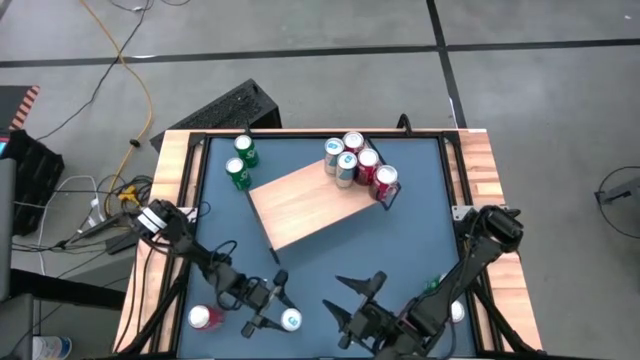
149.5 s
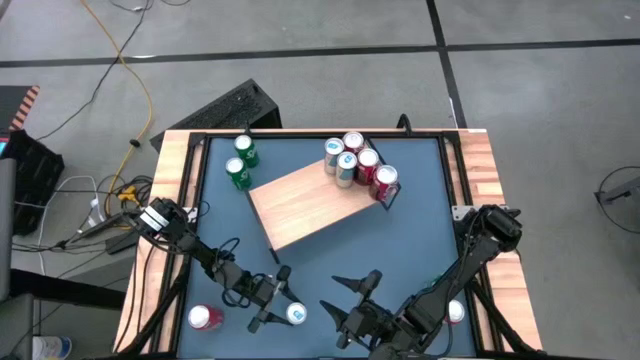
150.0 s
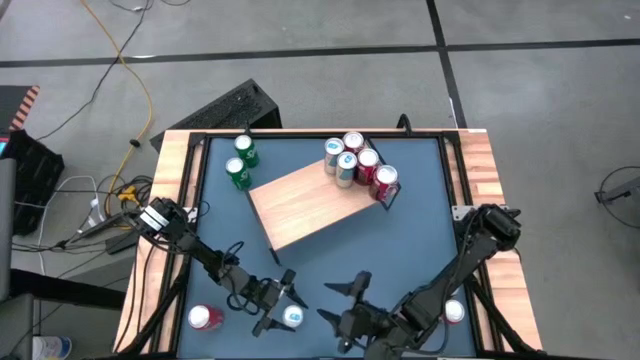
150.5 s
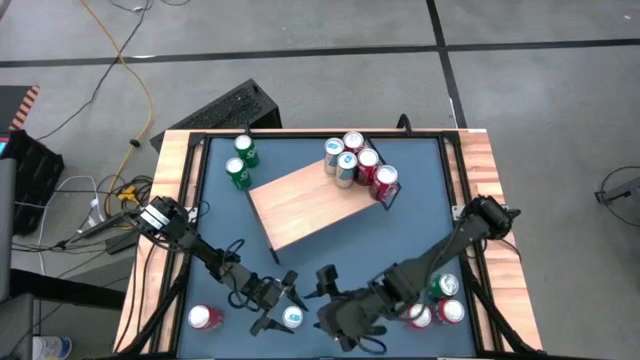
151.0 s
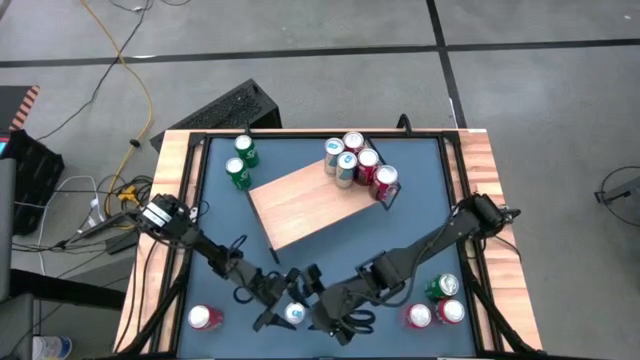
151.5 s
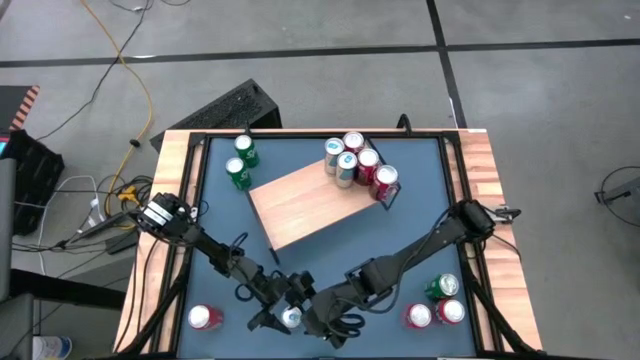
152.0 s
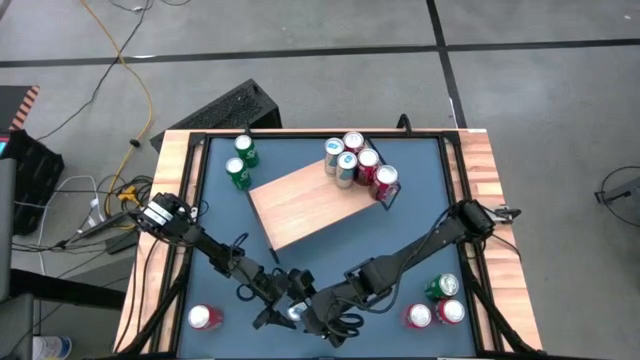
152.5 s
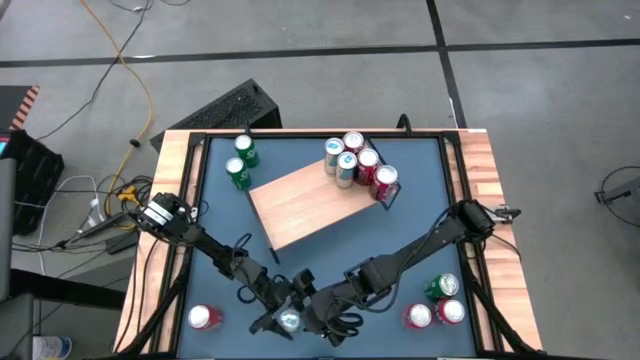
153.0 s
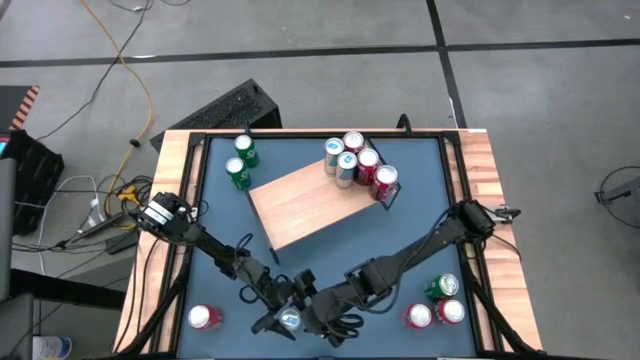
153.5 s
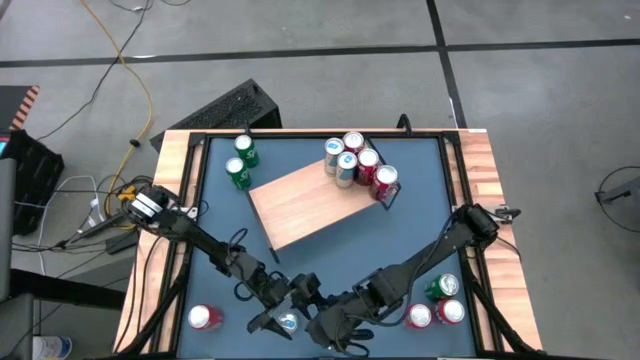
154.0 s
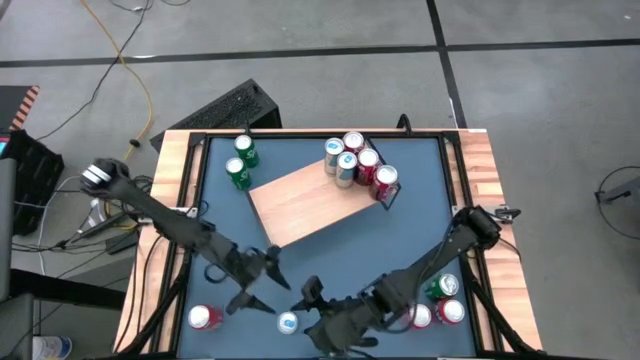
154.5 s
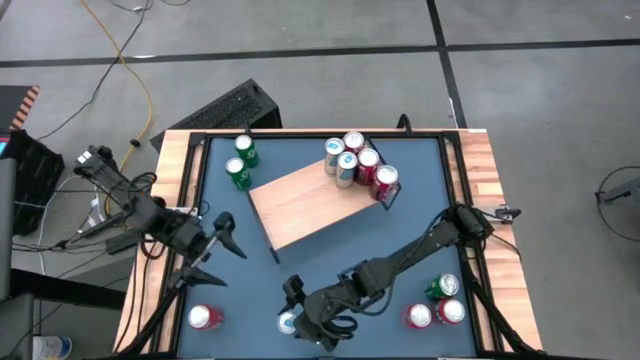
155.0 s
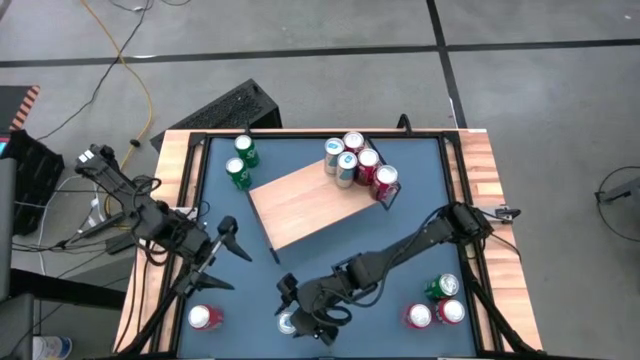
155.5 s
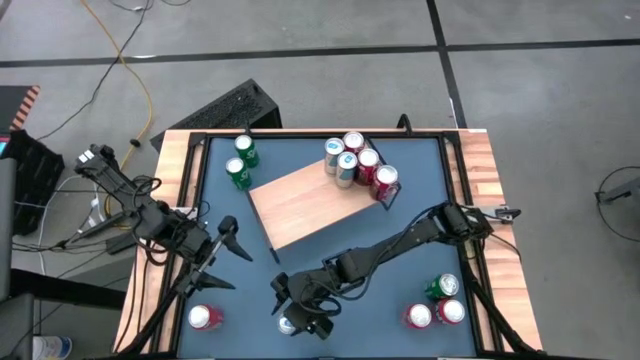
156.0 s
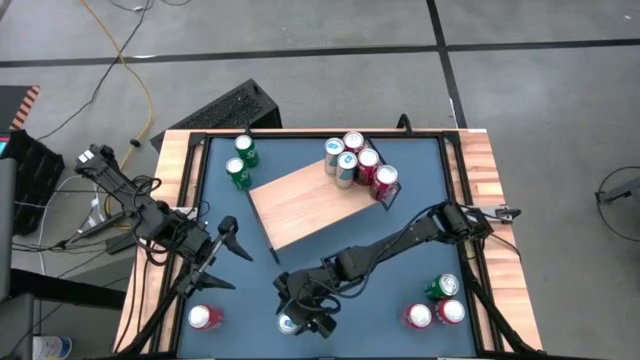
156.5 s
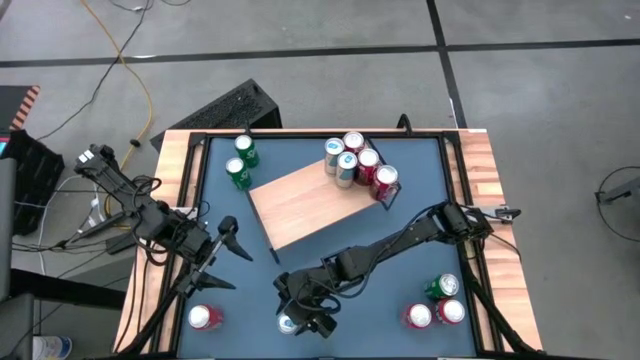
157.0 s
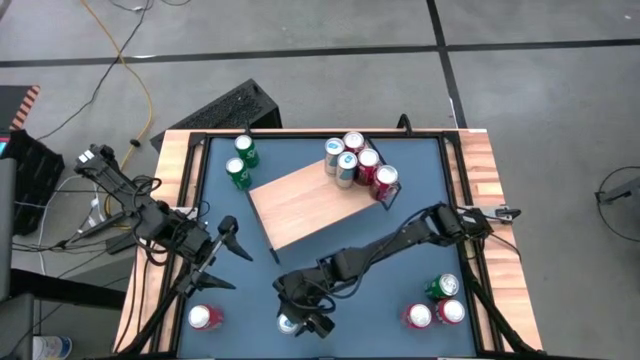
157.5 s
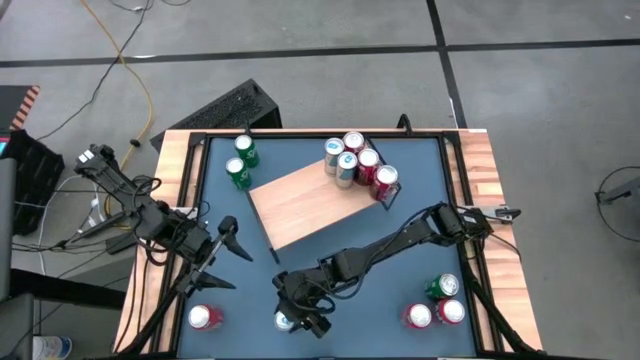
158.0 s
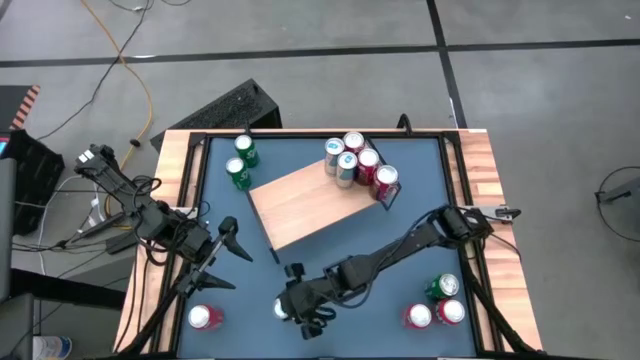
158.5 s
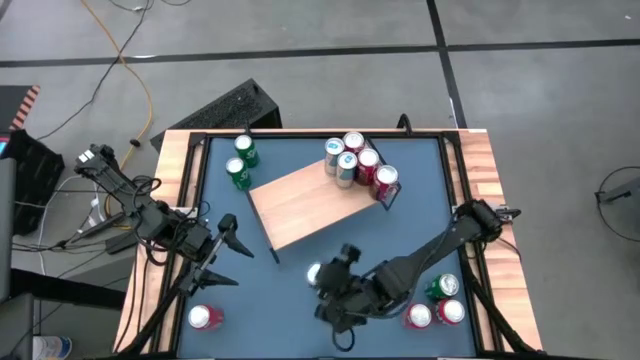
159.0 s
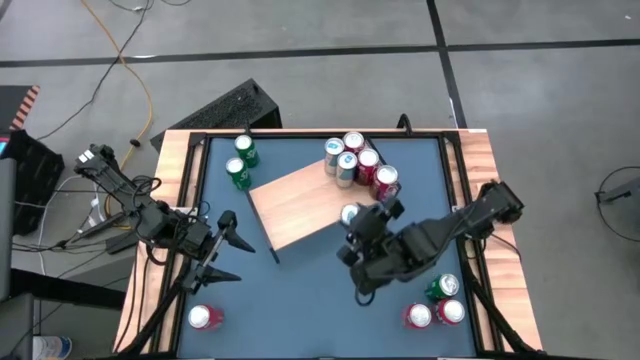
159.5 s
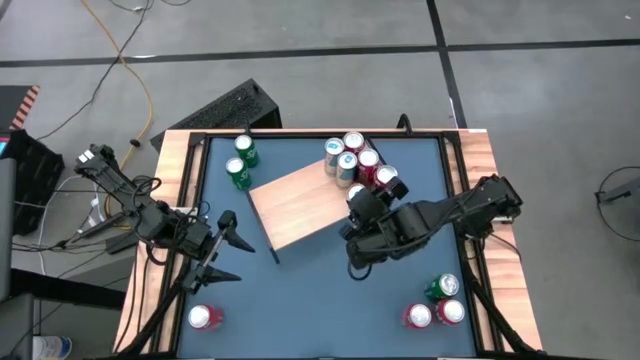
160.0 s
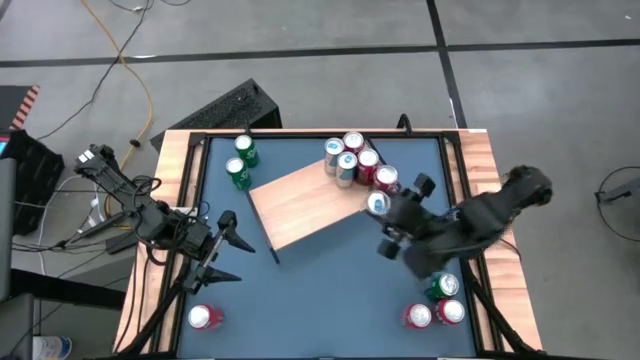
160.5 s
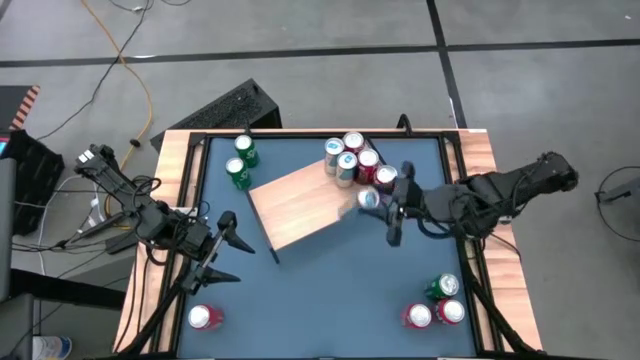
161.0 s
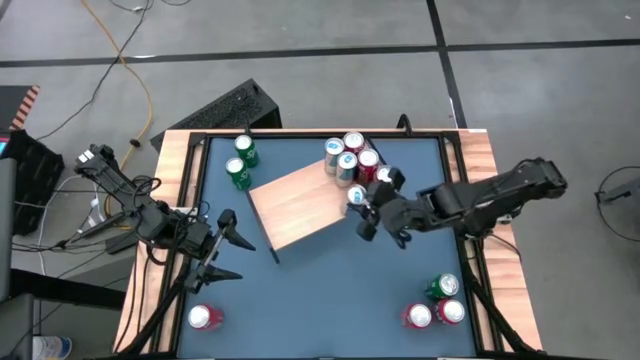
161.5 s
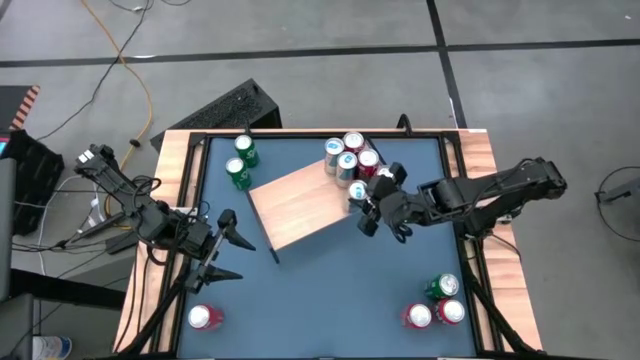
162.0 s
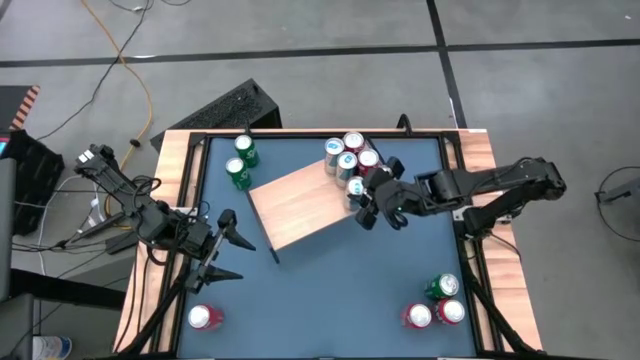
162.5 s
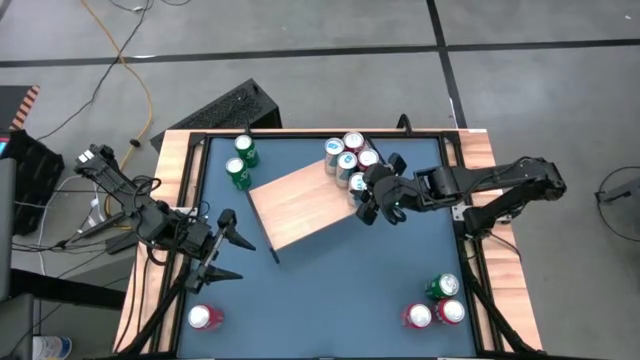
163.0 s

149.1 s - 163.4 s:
Task: Place canned beverage on shelf
Put the blue soda can on the shelf aligned with the other blue soda cans

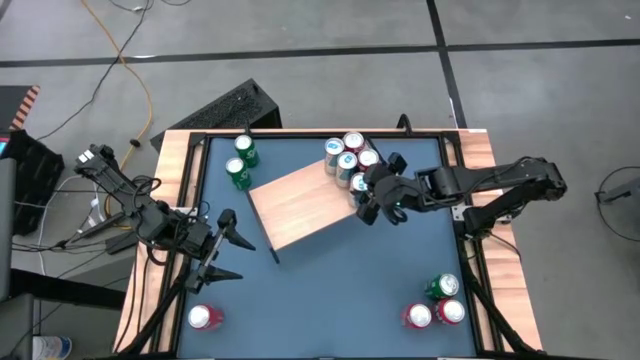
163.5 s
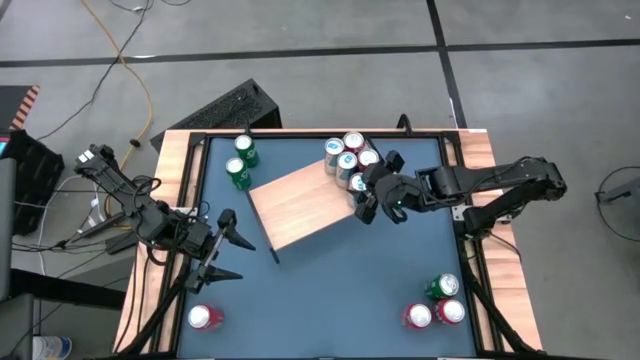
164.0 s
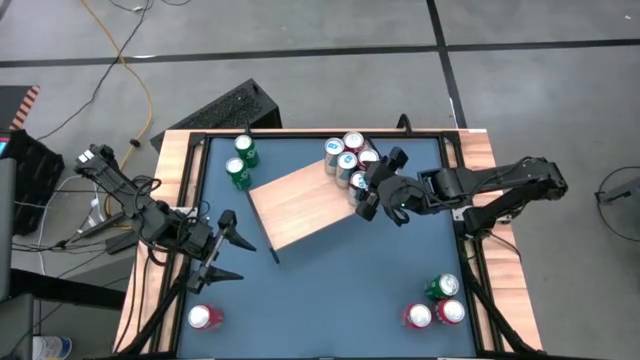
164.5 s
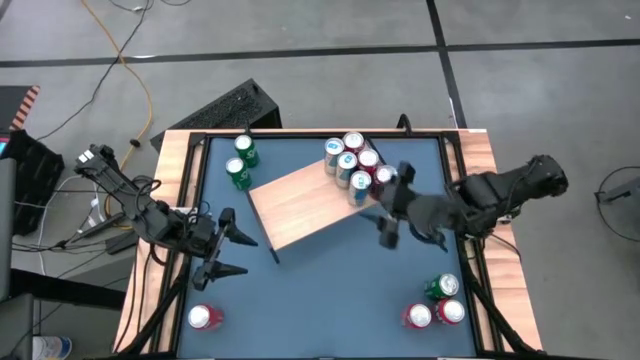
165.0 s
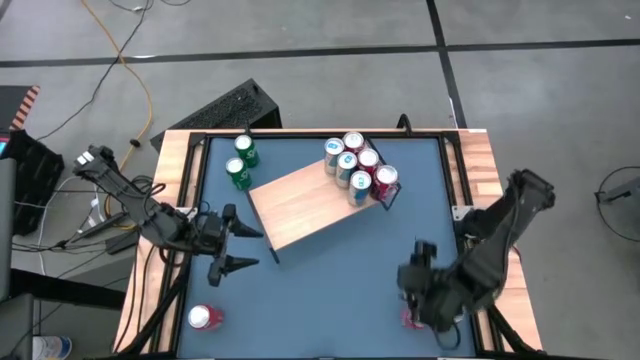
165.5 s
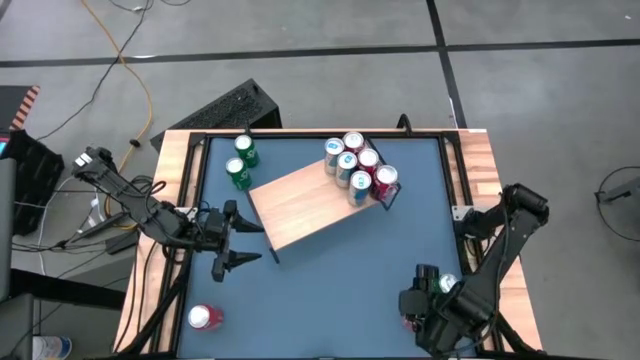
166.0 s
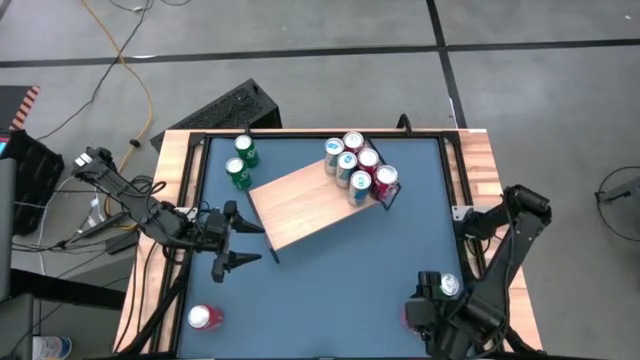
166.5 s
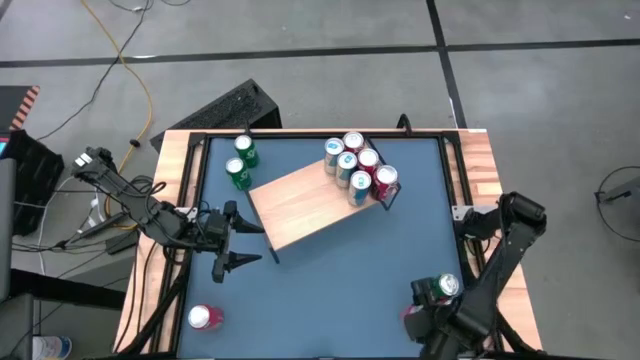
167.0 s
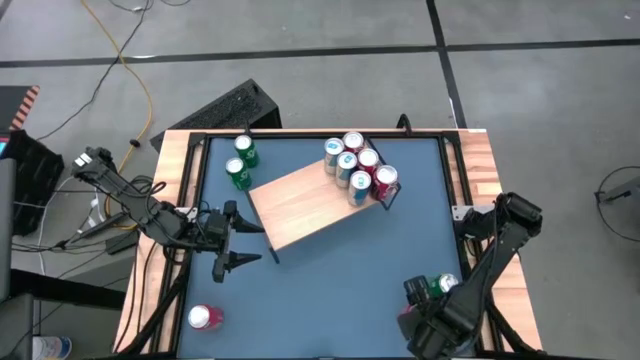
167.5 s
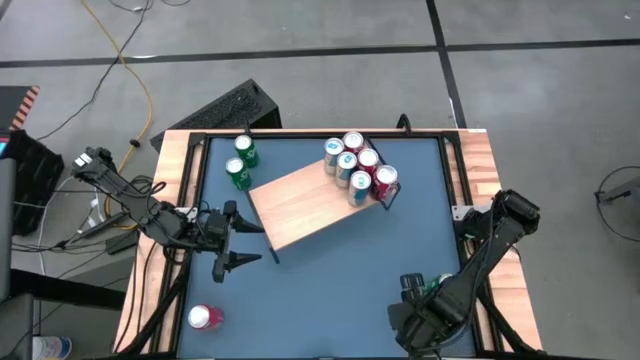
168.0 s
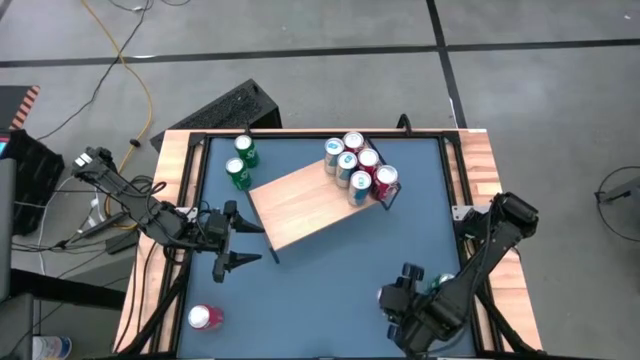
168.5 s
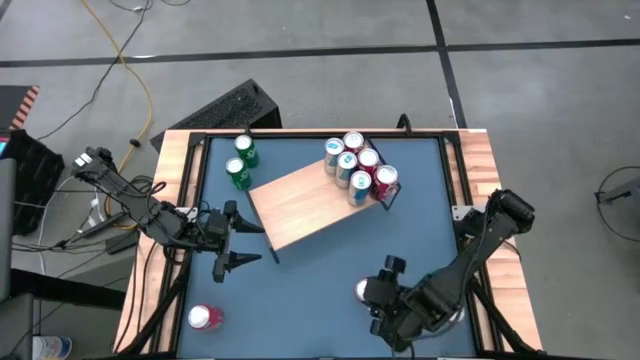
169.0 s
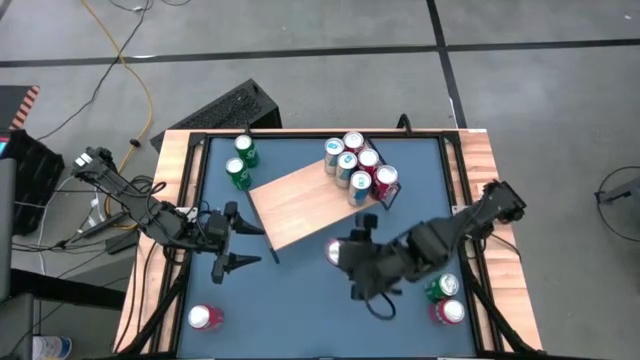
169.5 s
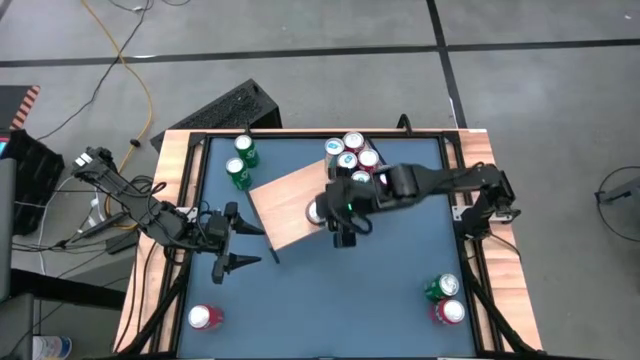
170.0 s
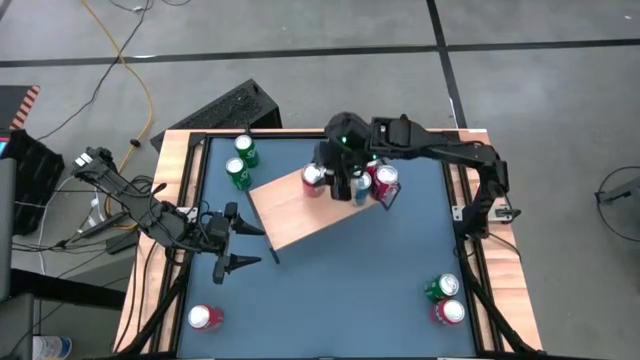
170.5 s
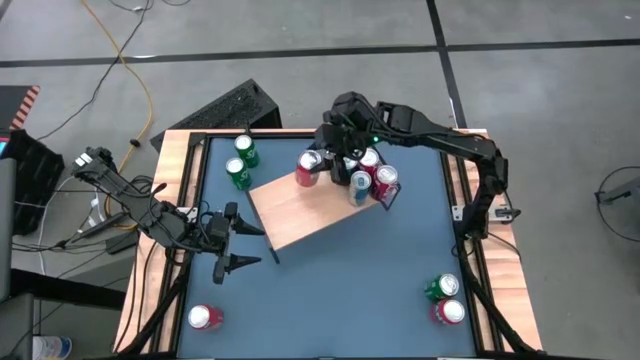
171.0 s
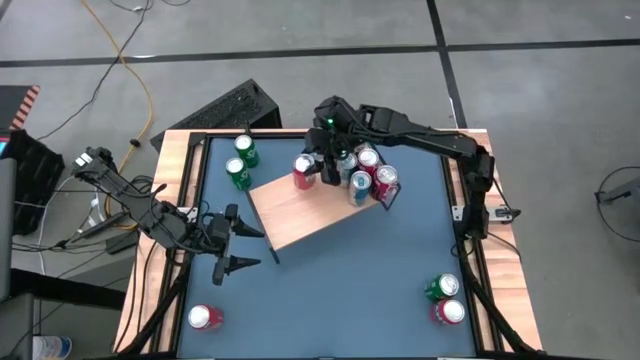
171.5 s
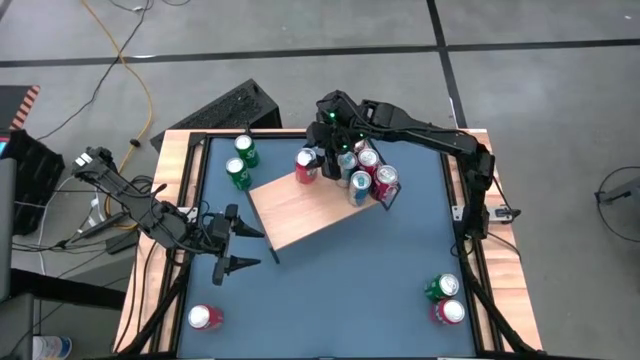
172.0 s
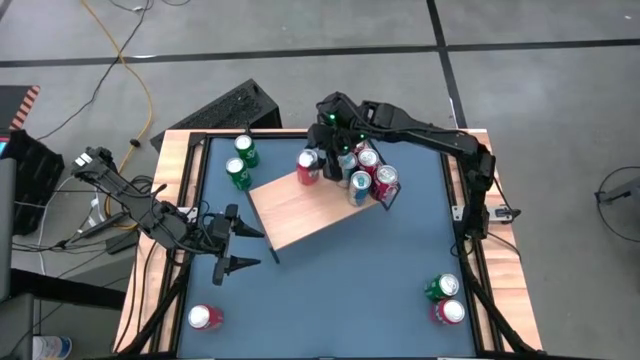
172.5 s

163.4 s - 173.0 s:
Put the middle red soda can on the shelf
